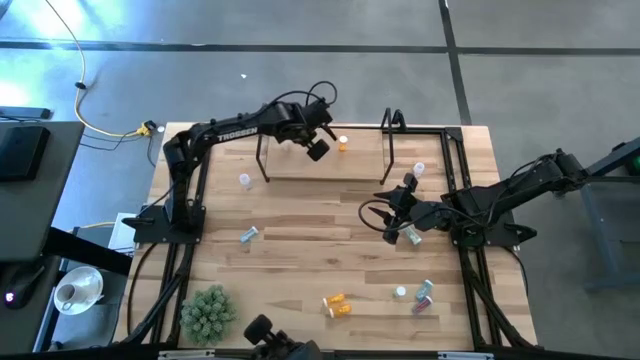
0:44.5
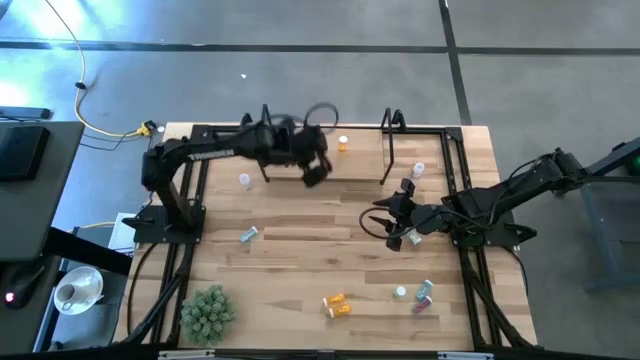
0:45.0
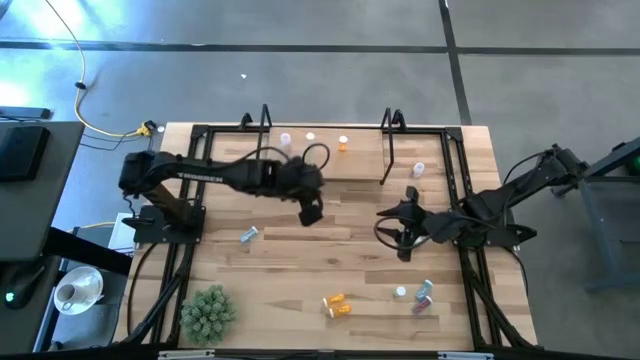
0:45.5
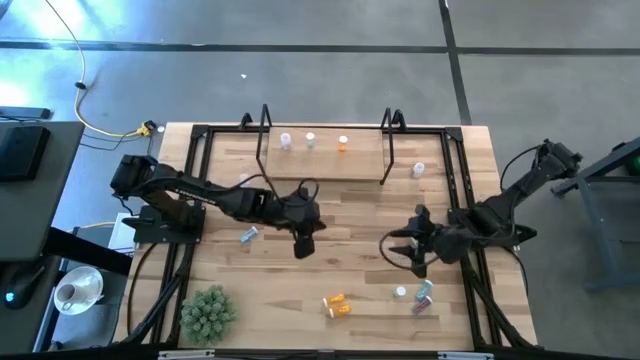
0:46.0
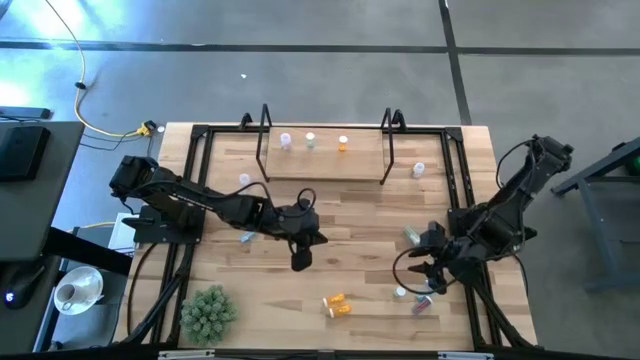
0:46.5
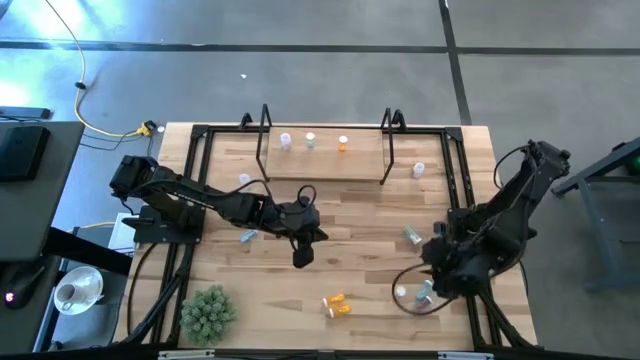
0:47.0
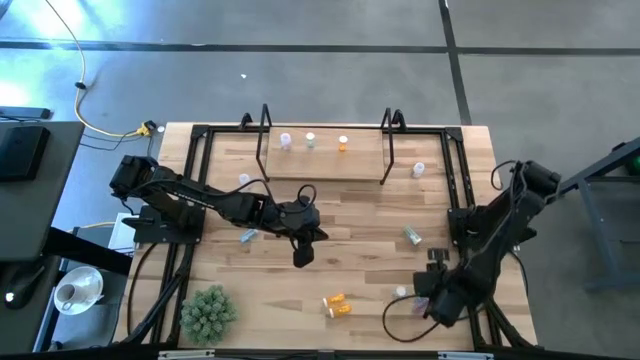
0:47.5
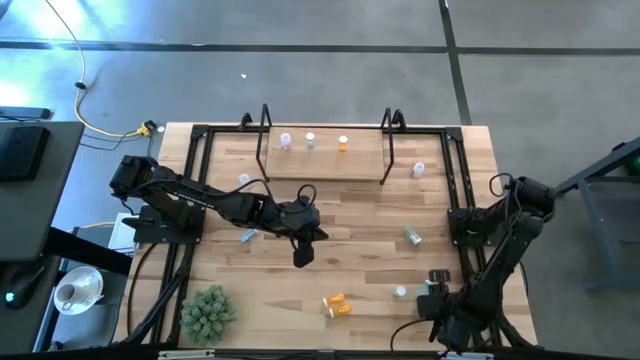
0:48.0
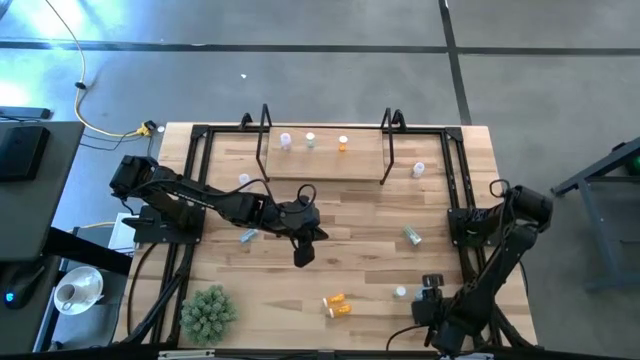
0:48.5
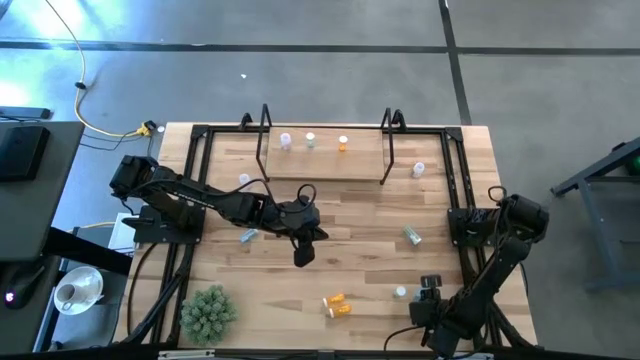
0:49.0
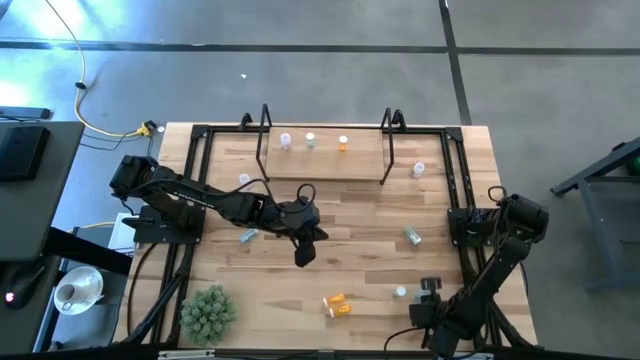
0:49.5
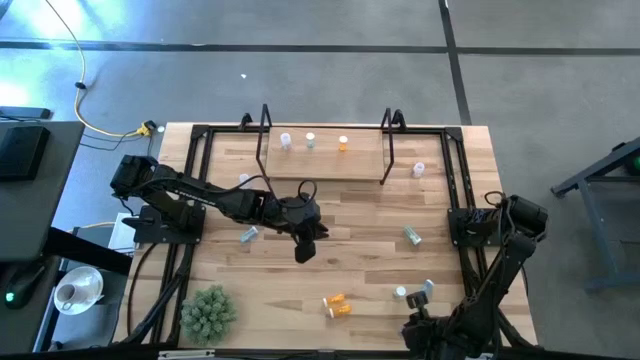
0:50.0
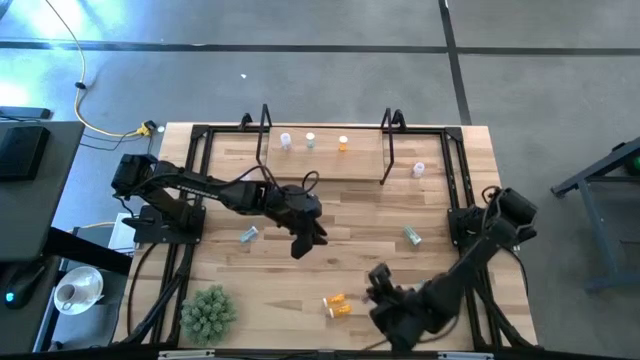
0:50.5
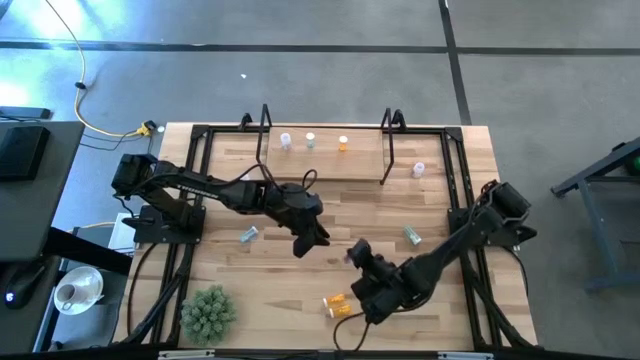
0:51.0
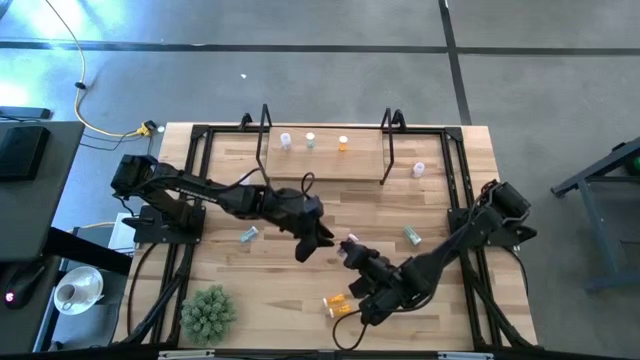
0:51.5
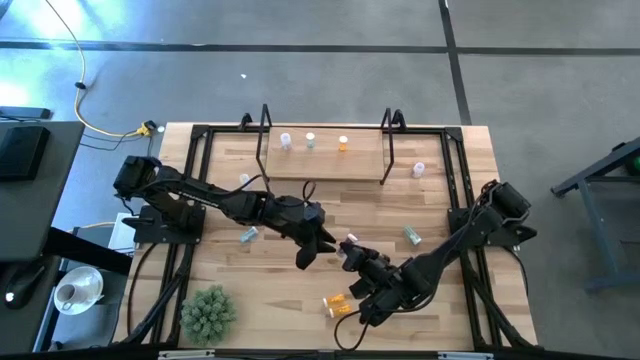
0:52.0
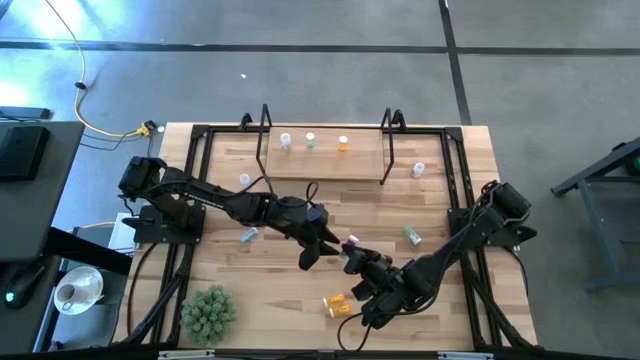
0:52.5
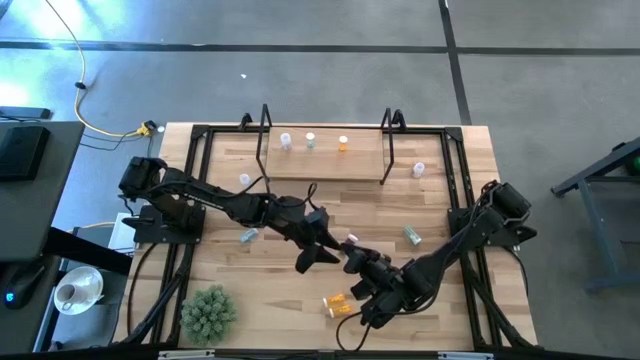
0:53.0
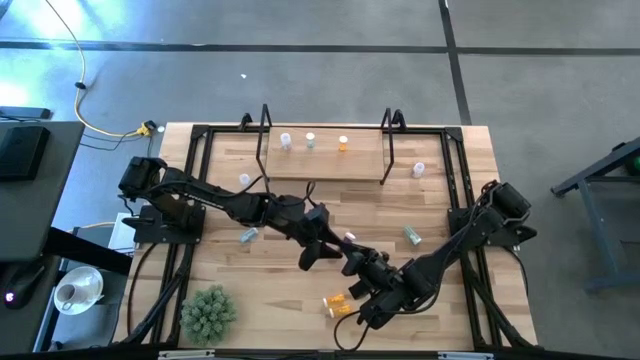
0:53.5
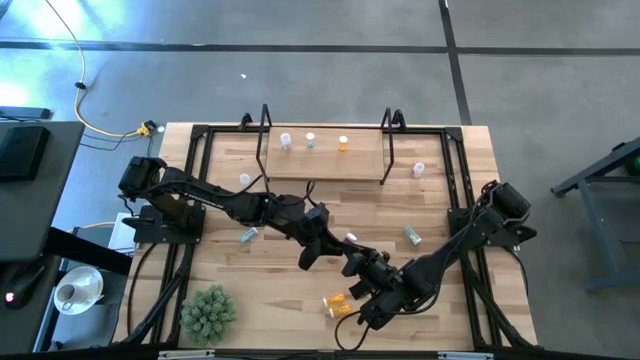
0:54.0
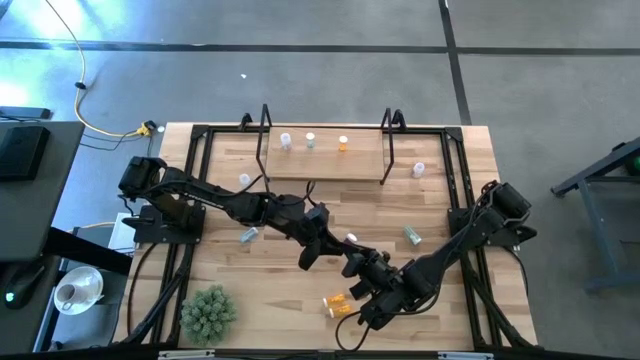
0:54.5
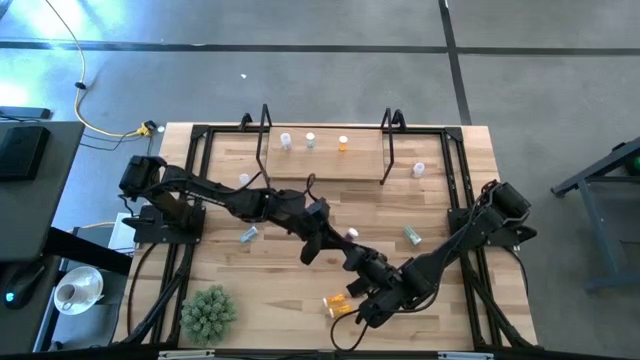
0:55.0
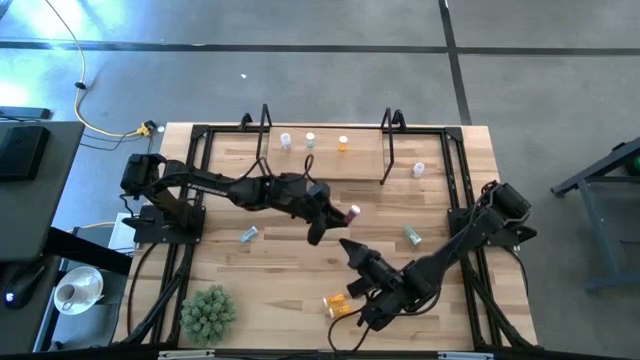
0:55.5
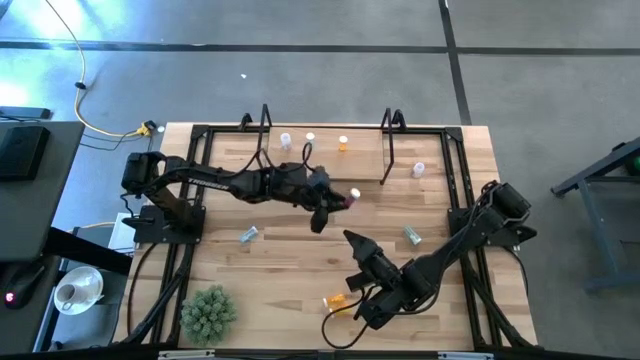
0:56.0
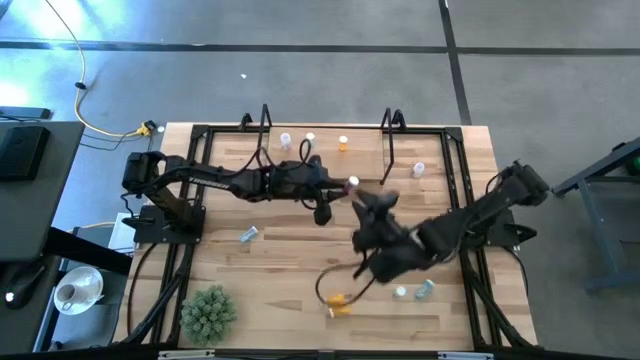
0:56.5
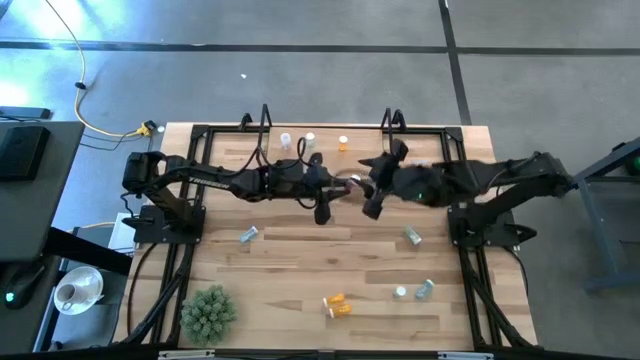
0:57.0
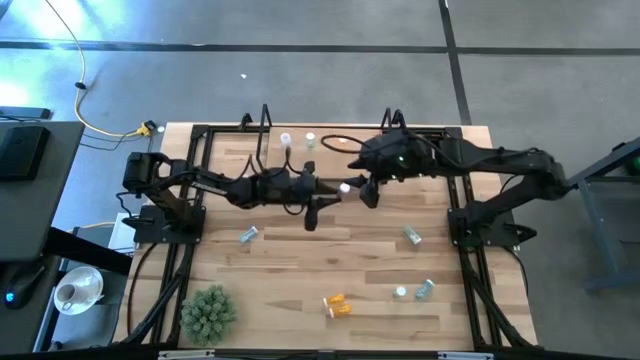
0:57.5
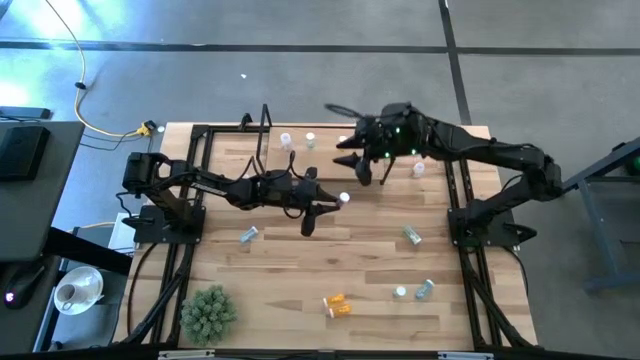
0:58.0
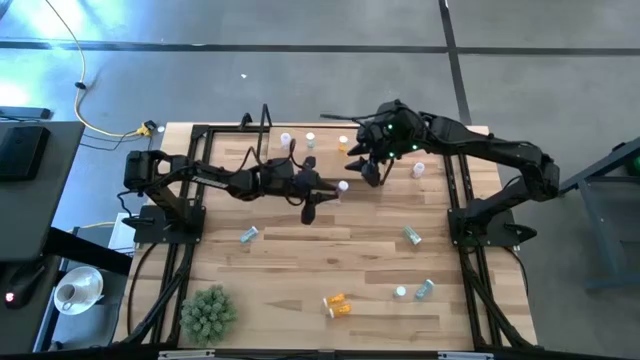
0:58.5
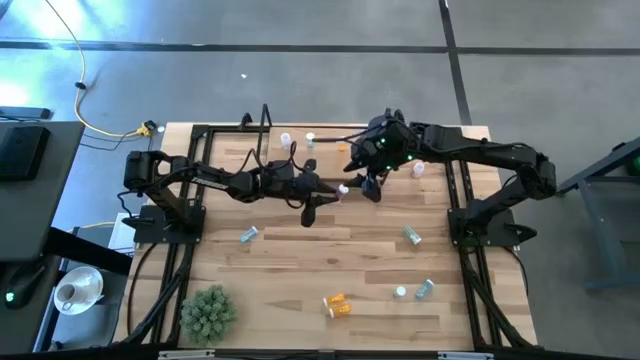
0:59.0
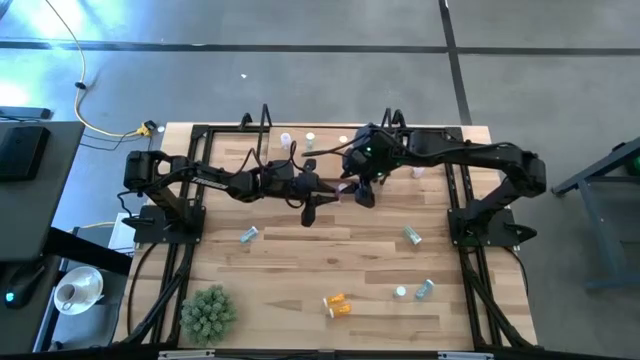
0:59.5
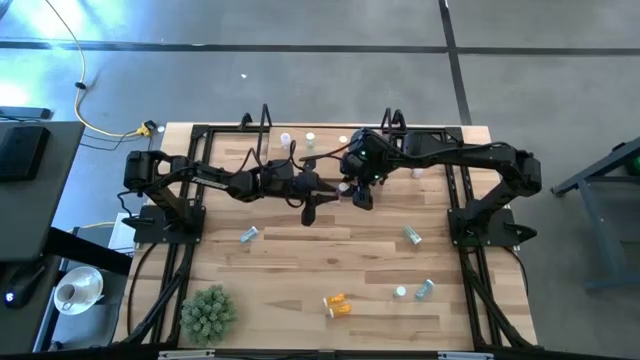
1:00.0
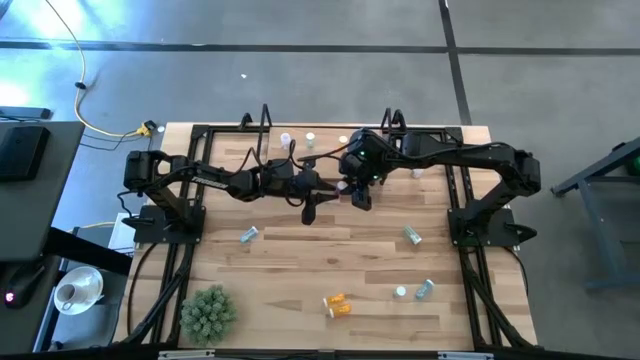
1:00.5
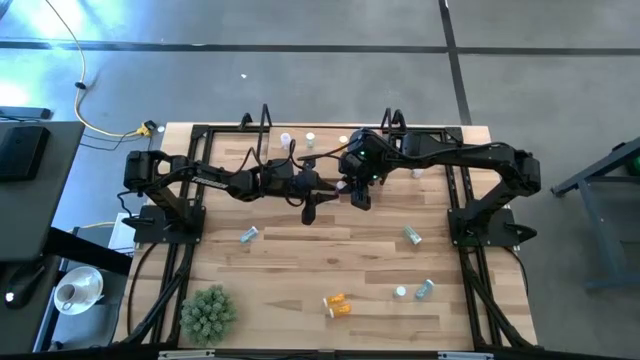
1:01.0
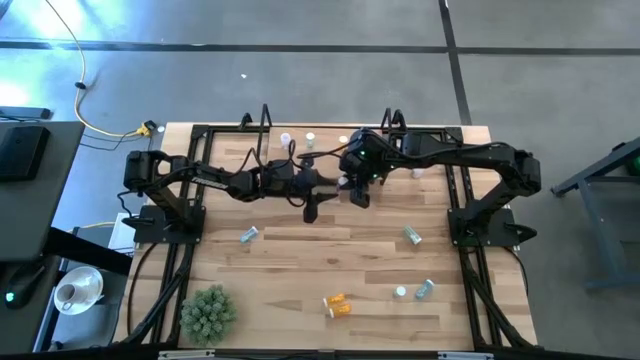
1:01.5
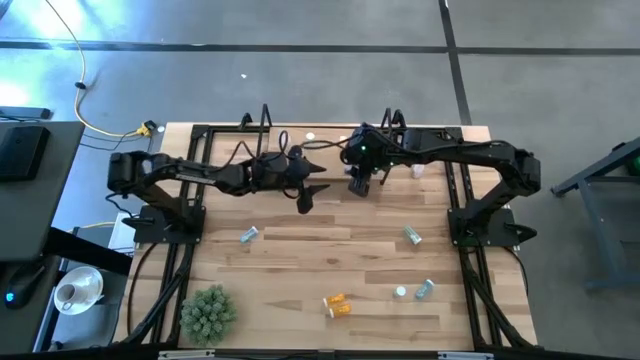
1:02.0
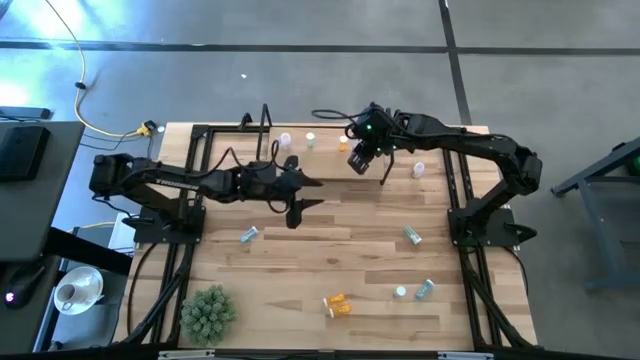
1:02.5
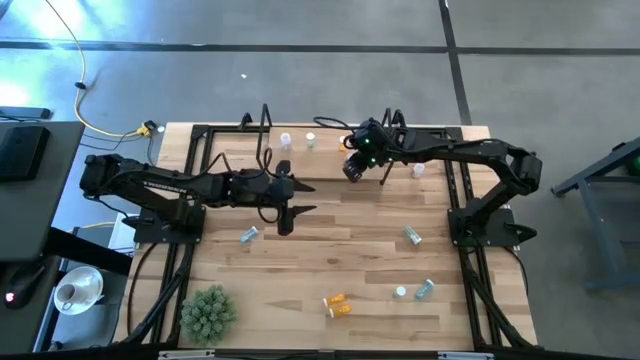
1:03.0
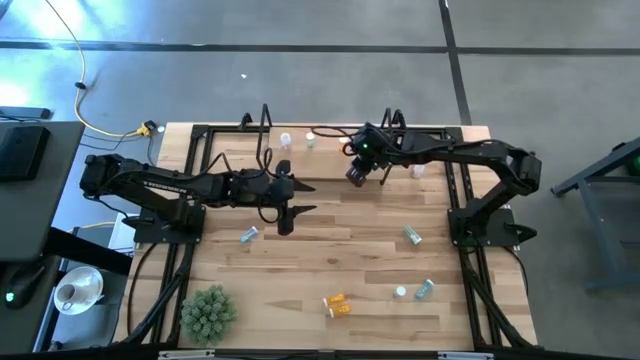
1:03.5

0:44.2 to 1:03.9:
Task: Pick and place medicine bottles onto shelf by color
Put the bottom blue pill bottle on the shelf

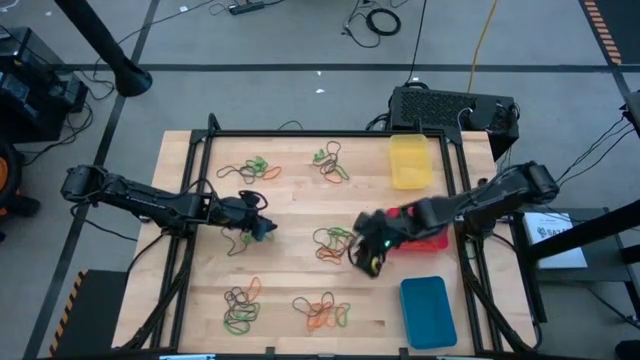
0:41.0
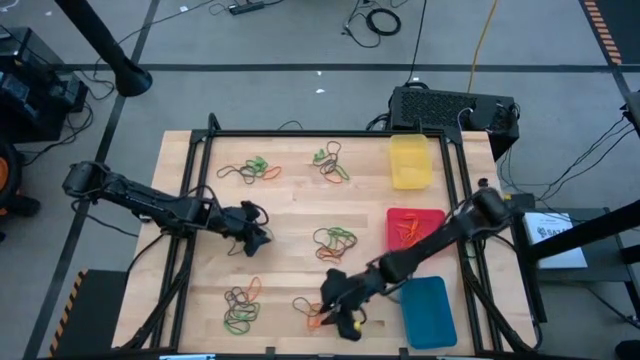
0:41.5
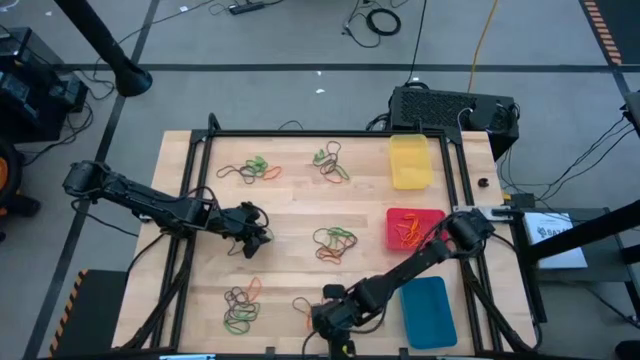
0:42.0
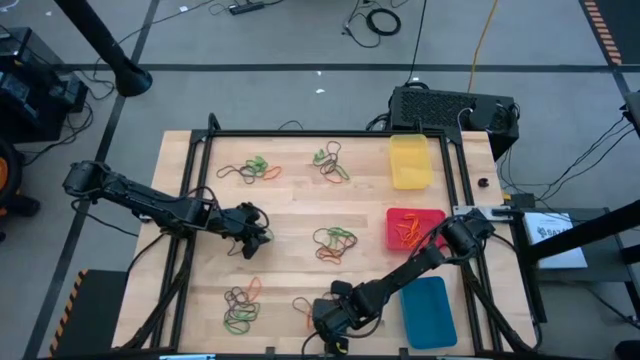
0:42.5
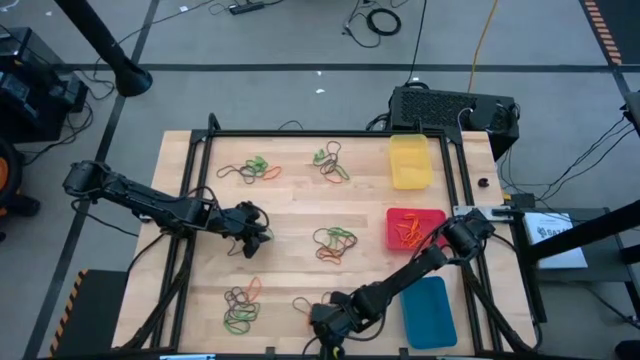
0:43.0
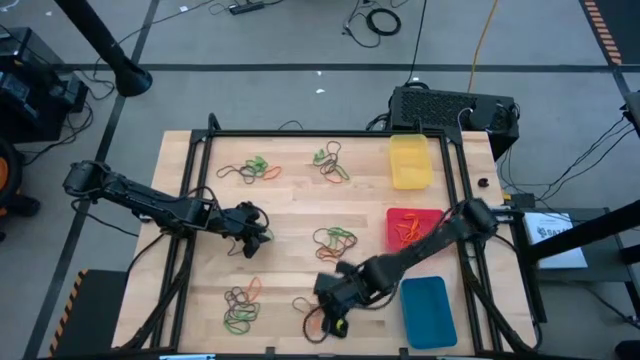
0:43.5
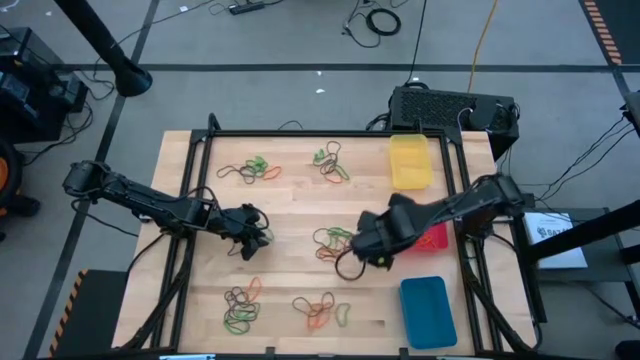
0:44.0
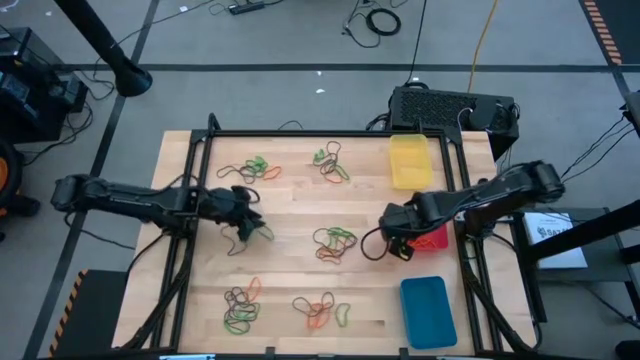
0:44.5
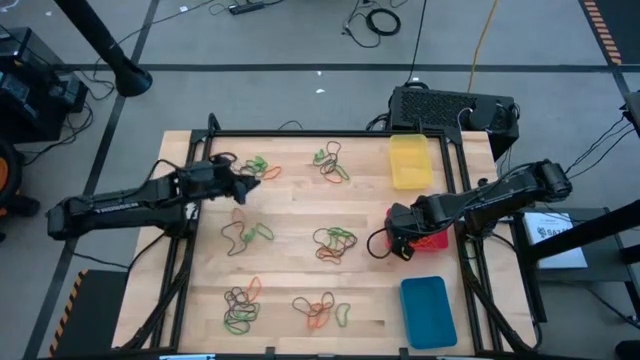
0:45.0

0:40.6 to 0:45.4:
Task: Sort rubber bands into baskets
Put the orange rubber band into the red bin
